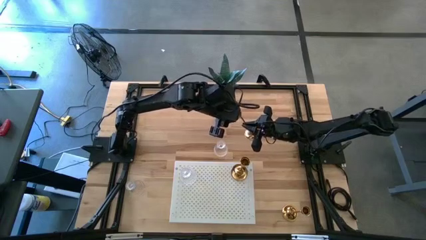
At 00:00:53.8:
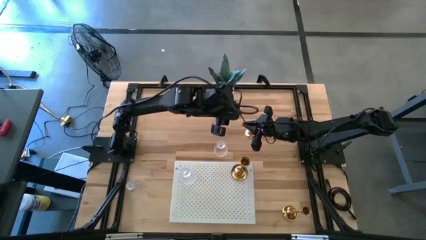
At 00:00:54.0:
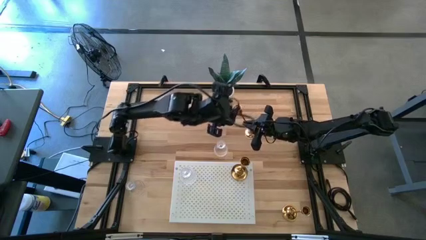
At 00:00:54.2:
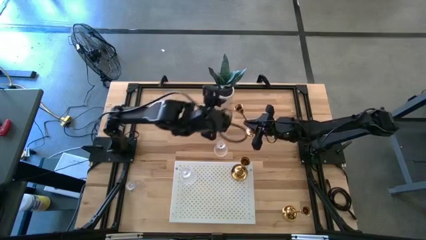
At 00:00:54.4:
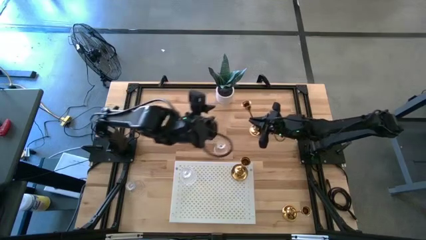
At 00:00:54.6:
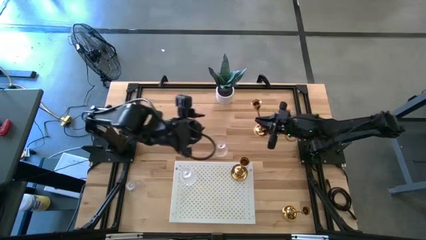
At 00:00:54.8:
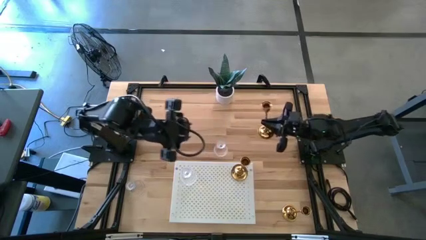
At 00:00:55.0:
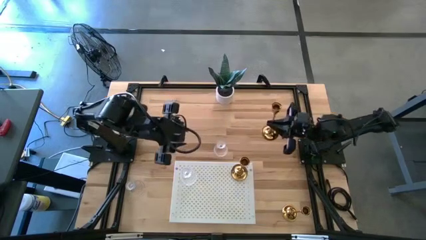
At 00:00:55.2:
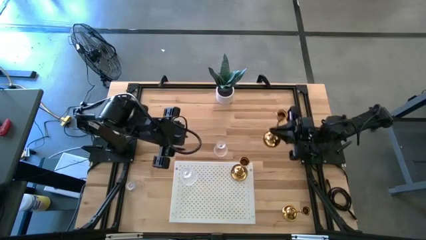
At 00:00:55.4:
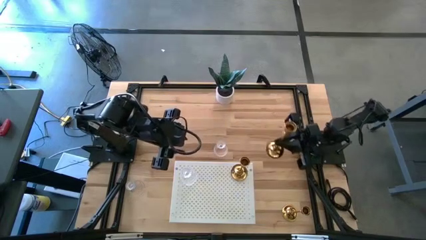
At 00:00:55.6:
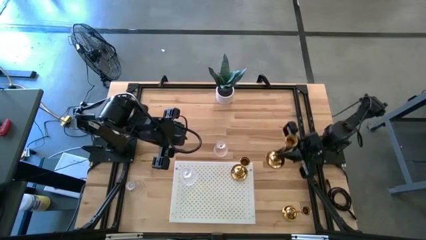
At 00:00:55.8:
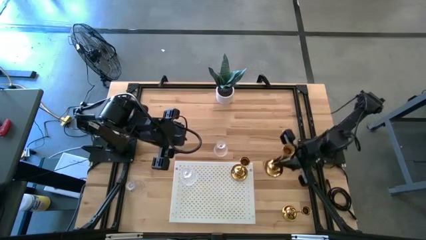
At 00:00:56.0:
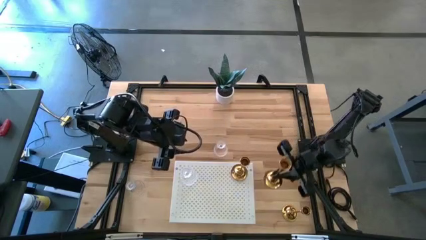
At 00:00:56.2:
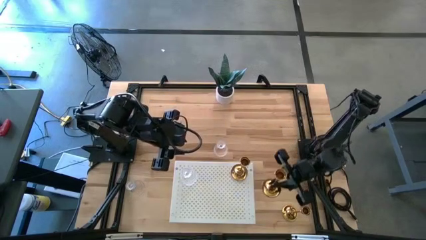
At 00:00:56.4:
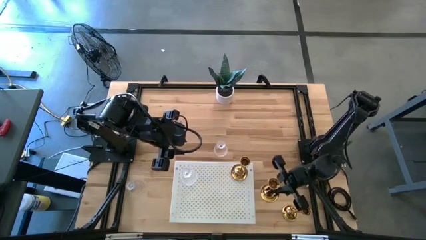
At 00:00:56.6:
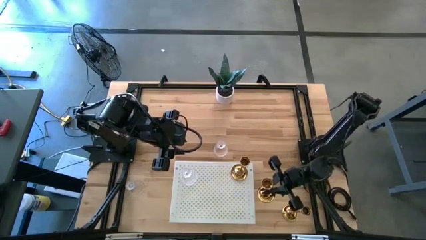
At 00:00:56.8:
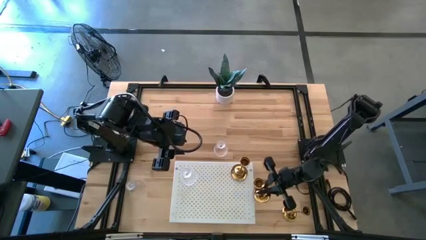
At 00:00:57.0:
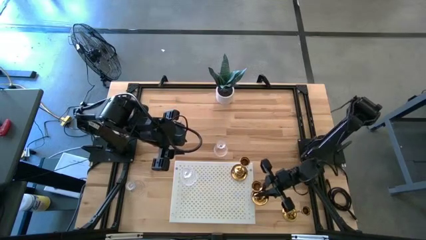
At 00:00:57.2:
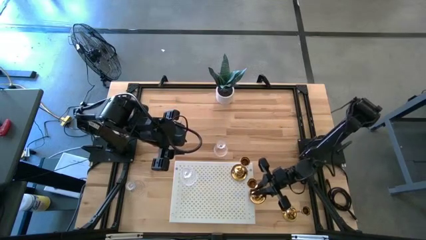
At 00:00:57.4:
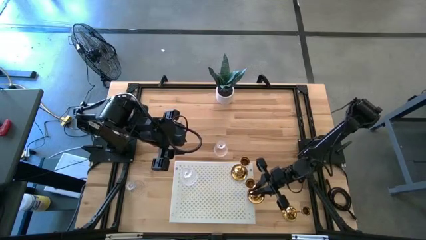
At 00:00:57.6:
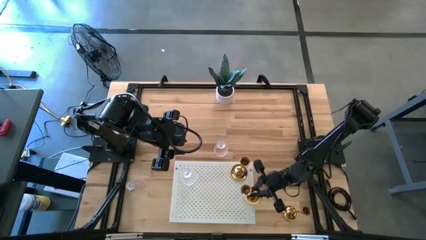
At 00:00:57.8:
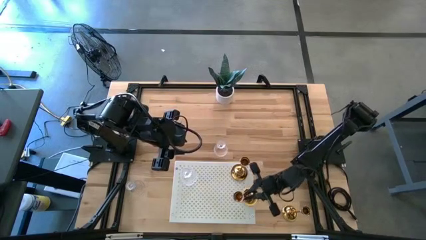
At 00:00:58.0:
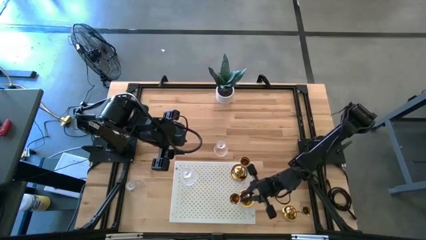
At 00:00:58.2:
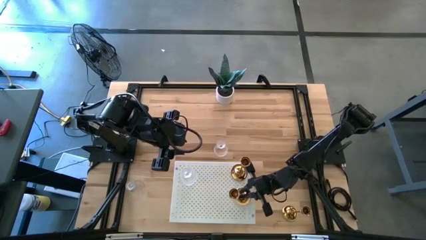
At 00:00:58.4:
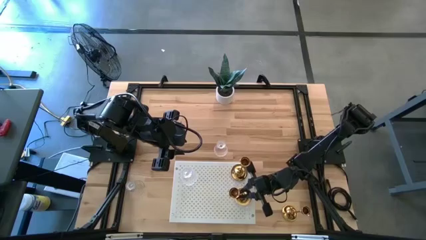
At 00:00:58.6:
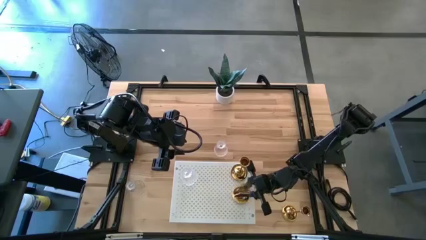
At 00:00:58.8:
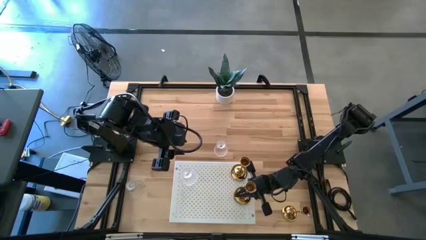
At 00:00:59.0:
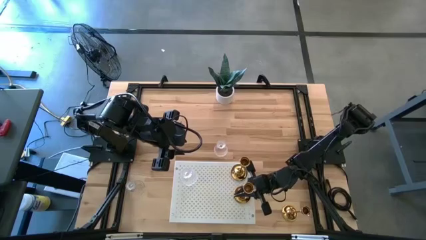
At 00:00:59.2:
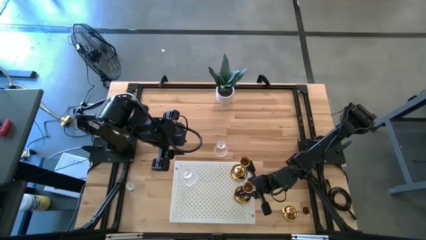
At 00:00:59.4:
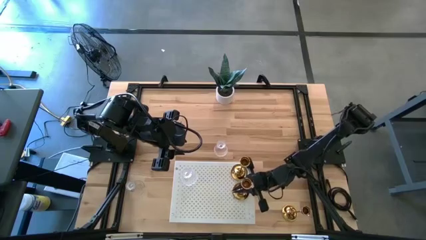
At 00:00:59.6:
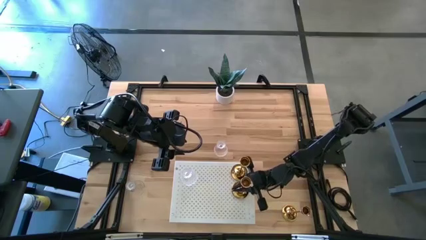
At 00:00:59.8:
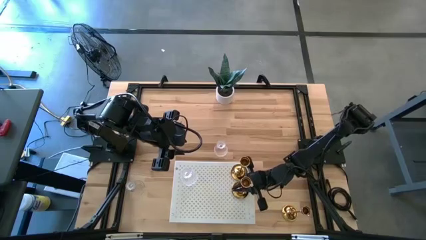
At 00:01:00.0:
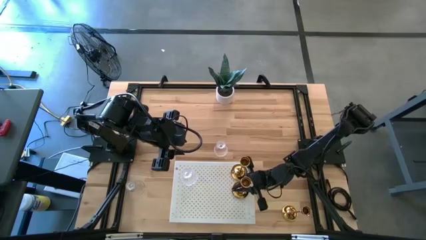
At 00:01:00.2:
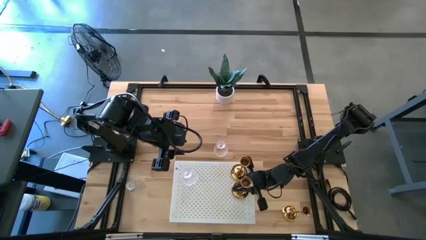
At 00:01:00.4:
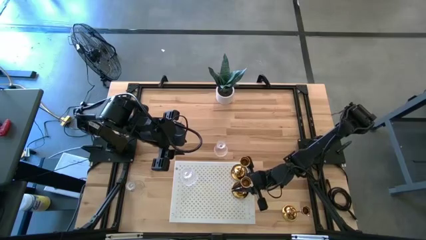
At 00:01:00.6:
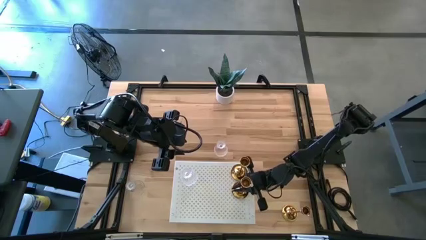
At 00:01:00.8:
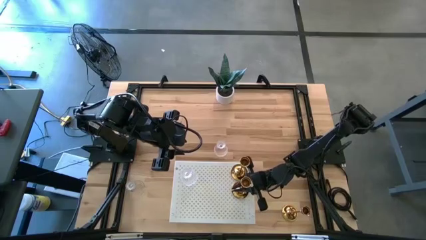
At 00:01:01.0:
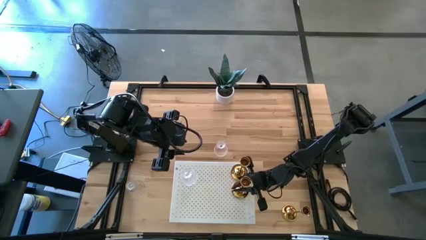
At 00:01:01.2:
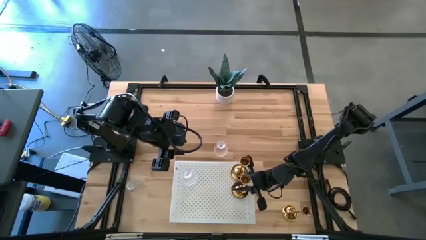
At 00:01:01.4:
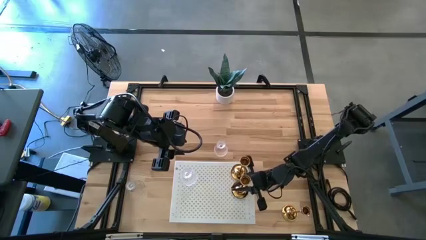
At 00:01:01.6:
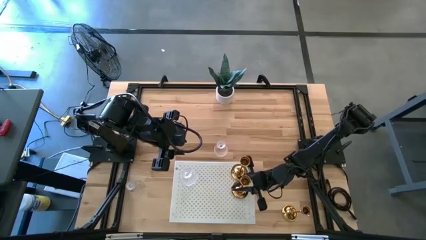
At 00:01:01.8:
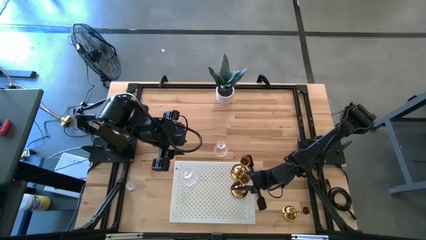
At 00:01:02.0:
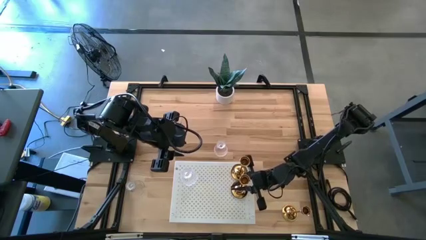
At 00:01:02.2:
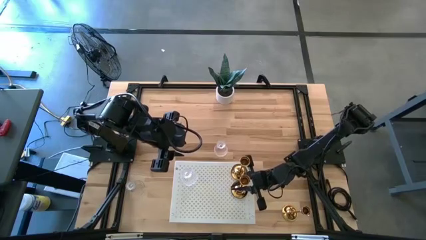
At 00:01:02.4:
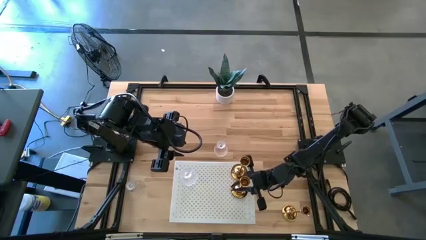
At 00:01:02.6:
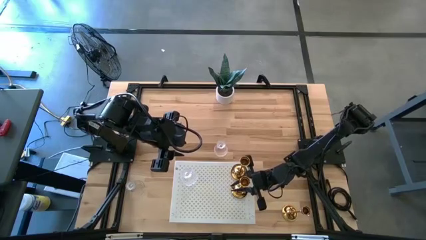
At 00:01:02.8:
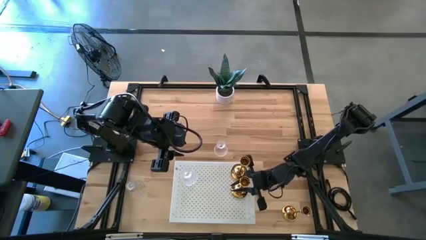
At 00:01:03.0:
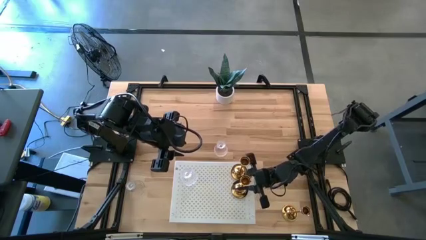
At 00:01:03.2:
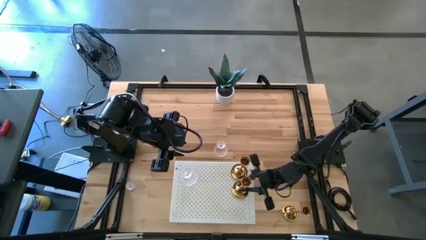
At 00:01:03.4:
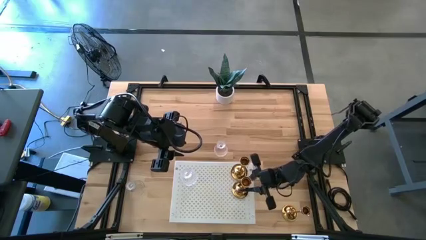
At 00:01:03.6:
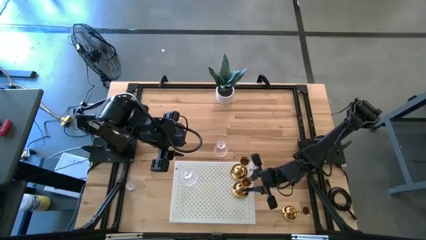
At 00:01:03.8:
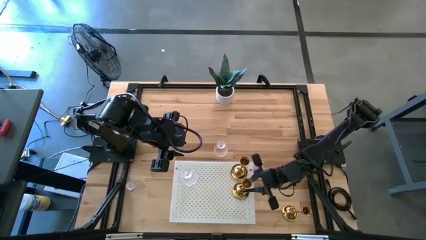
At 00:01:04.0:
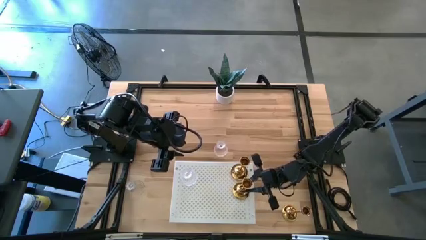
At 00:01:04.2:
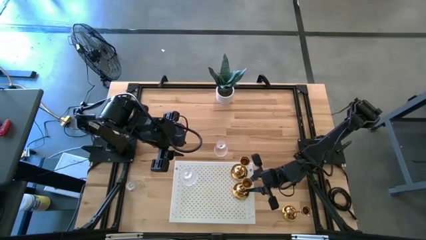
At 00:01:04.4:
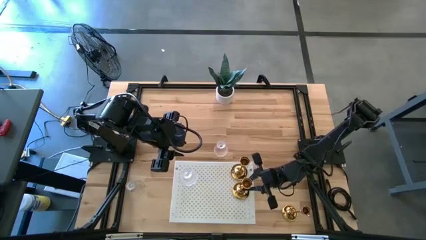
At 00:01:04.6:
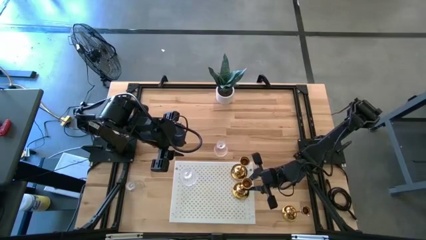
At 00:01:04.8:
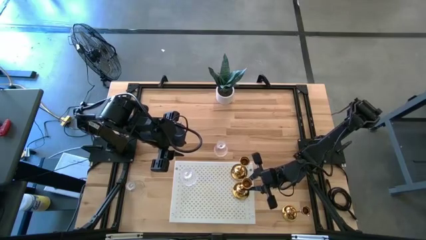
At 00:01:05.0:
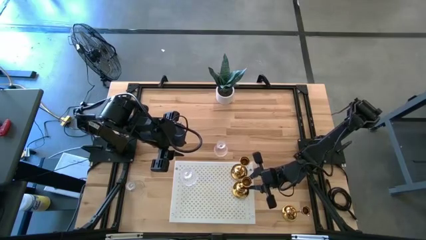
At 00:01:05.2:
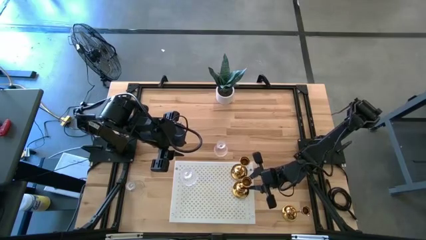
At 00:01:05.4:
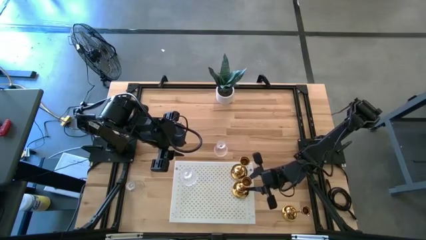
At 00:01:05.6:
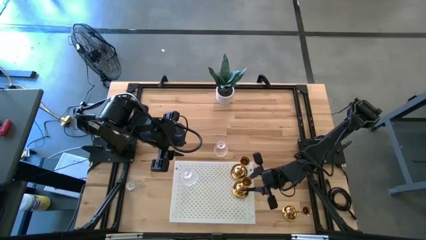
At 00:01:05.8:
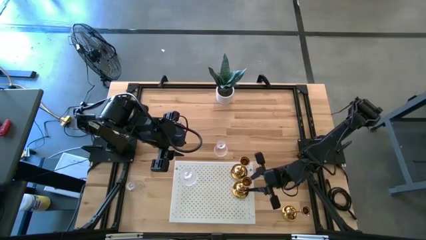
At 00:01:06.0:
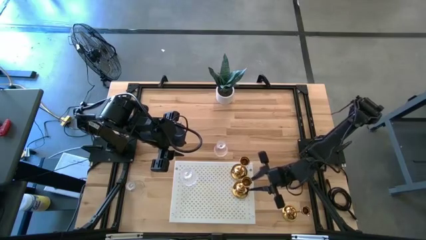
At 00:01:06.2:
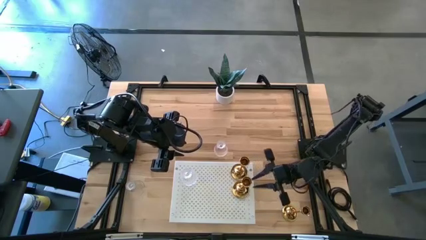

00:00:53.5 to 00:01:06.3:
Task: Pick & Place candle stick holders
Put the left candle holder on the shelf

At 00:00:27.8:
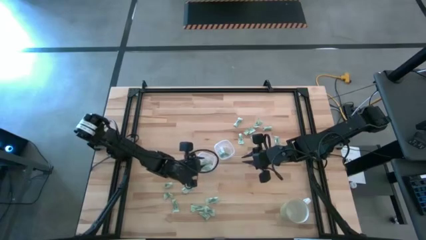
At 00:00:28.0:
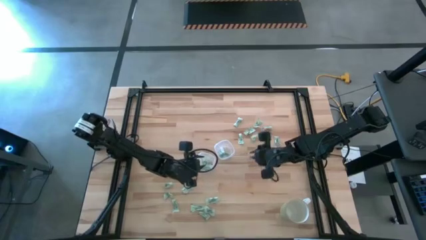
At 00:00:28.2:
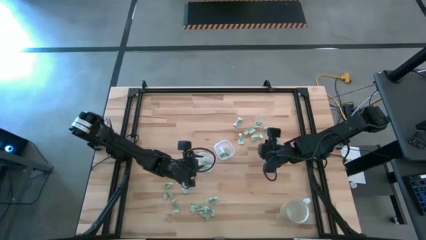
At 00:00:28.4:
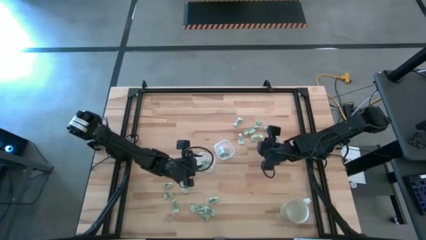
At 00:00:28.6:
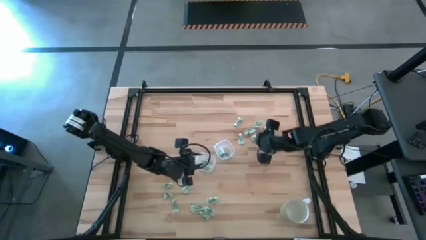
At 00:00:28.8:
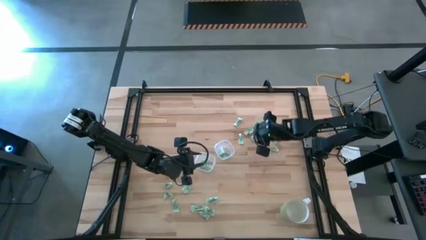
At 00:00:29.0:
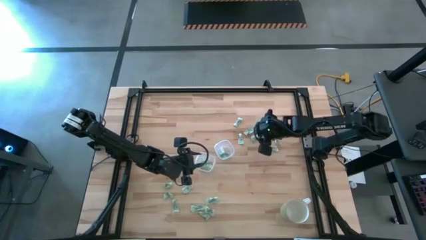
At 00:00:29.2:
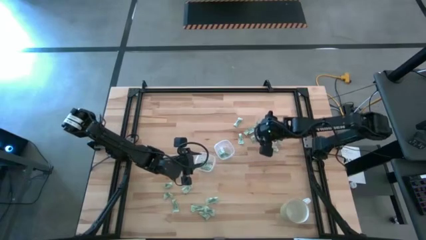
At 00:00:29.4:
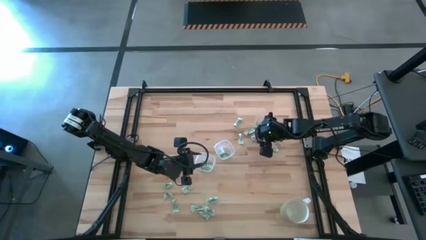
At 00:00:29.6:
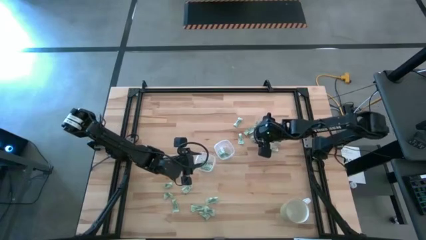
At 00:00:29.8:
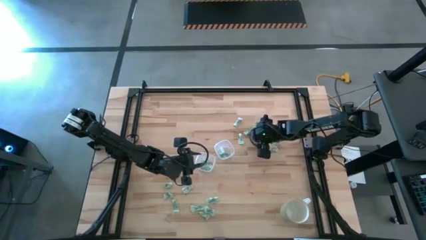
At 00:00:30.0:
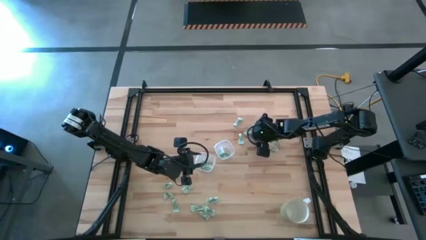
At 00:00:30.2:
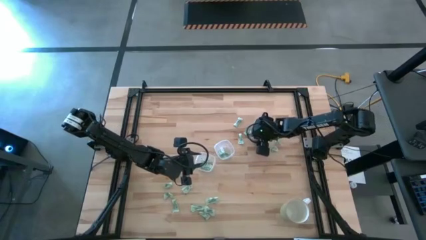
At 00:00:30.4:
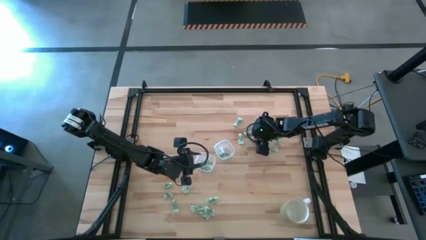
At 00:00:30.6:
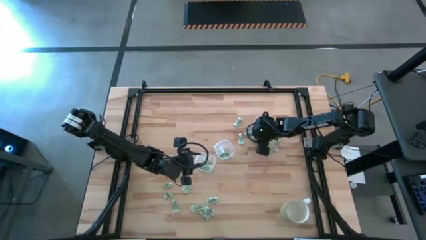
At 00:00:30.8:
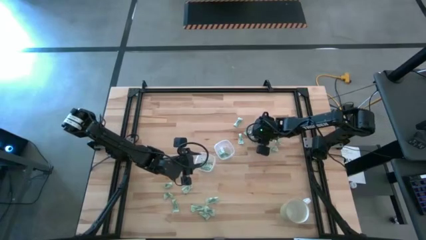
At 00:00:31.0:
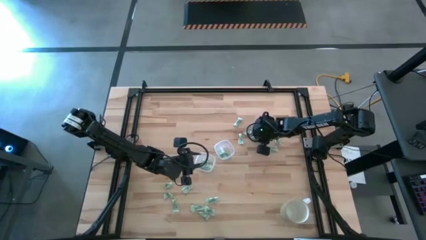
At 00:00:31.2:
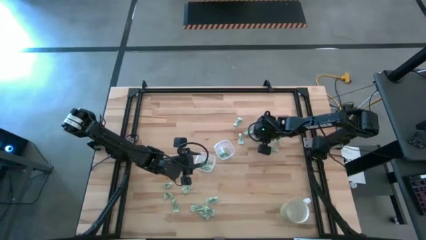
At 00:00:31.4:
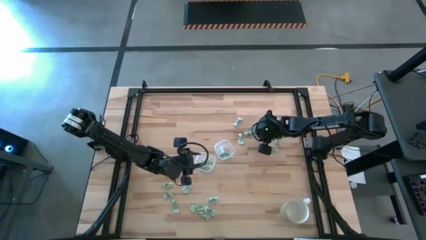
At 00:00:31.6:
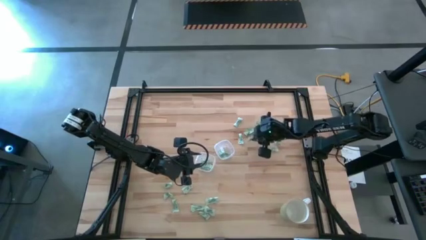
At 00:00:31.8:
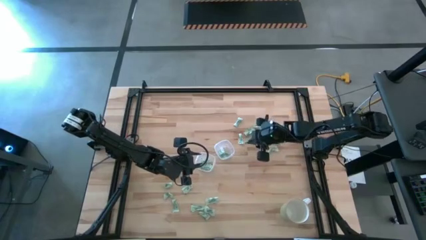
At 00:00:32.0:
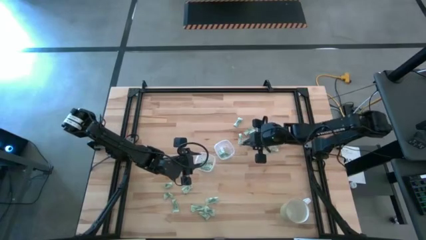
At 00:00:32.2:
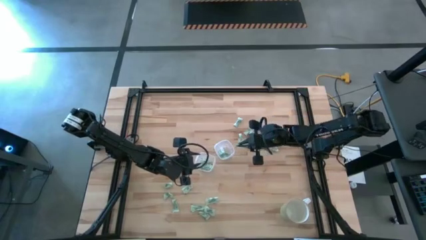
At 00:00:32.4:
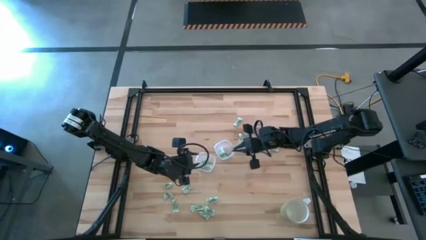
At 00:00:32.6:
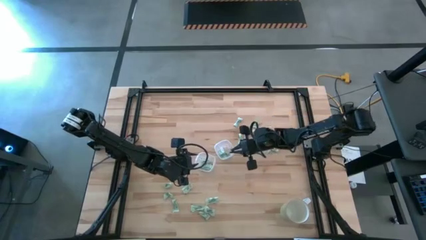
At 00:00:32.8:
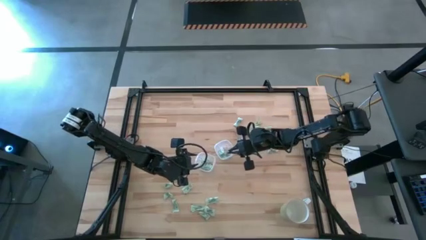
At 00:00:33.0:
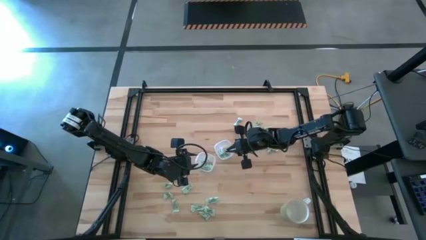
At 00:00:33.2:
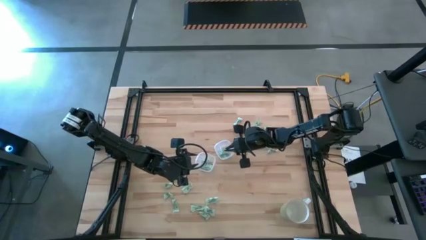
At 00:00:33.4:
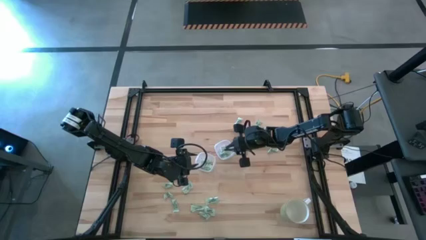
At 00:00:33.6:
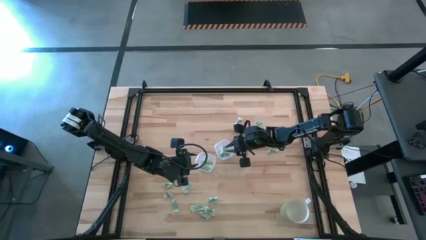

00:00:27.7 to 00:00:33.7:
Task: Pick and place items into bin
Put the stevia packet into the right bin
